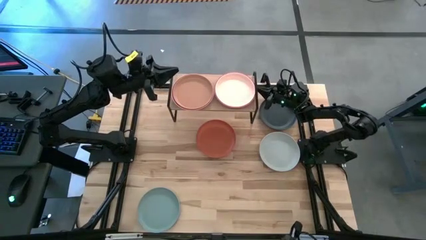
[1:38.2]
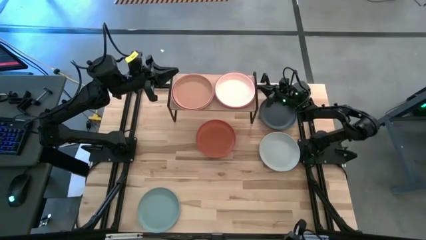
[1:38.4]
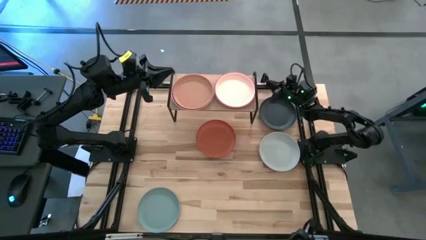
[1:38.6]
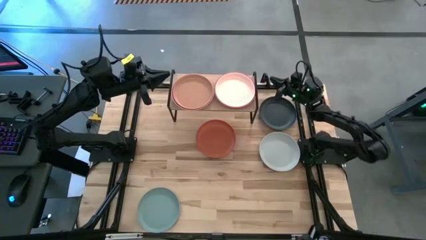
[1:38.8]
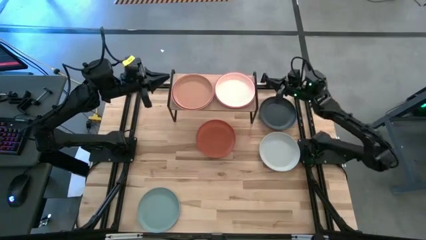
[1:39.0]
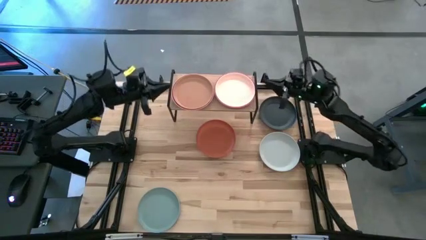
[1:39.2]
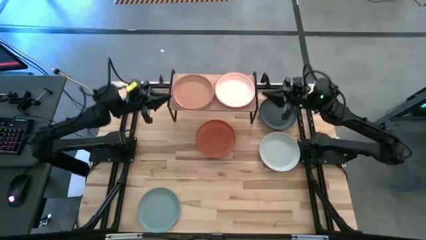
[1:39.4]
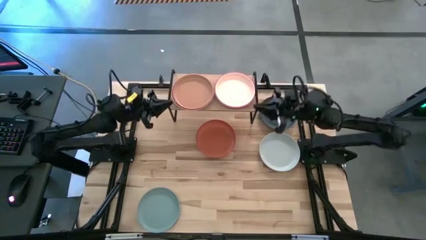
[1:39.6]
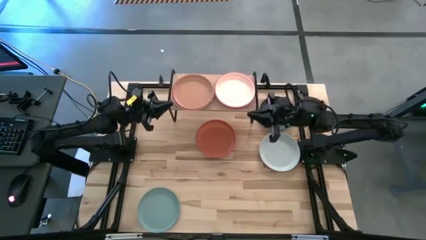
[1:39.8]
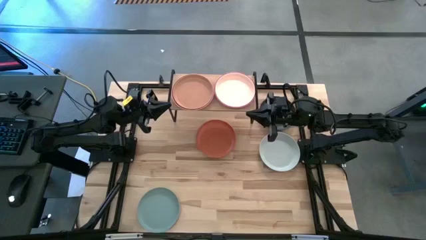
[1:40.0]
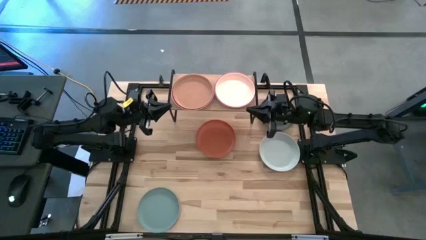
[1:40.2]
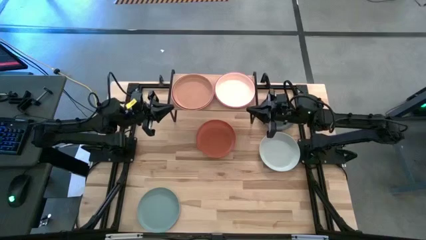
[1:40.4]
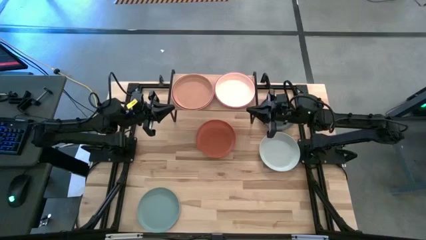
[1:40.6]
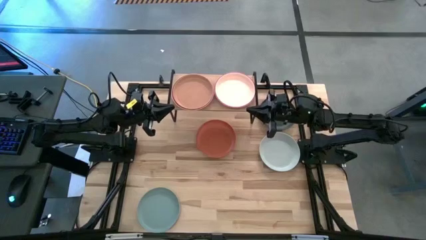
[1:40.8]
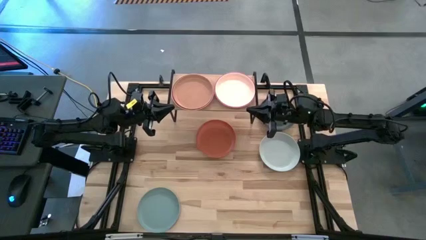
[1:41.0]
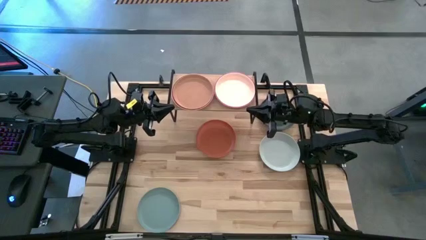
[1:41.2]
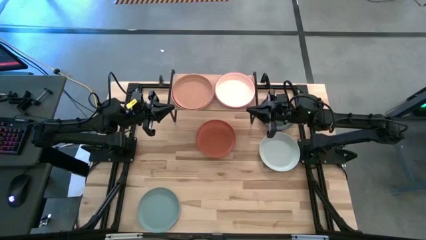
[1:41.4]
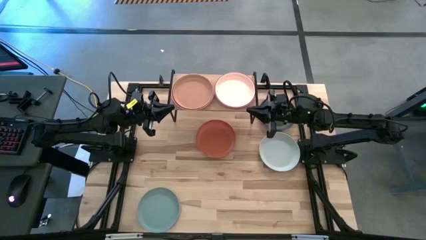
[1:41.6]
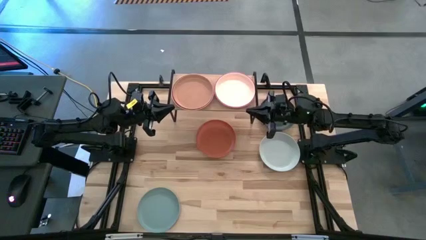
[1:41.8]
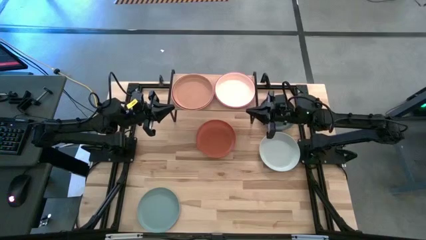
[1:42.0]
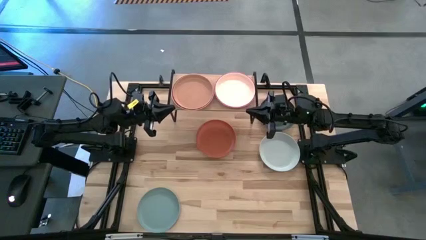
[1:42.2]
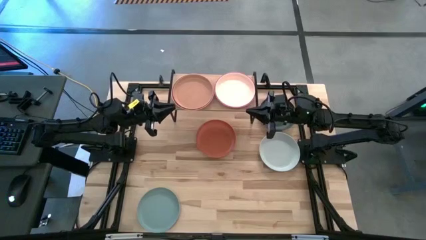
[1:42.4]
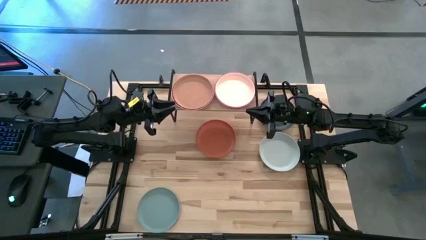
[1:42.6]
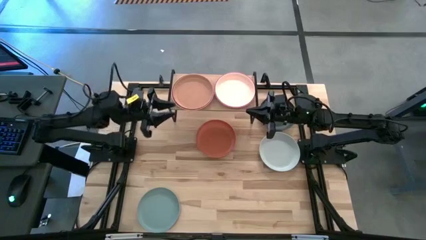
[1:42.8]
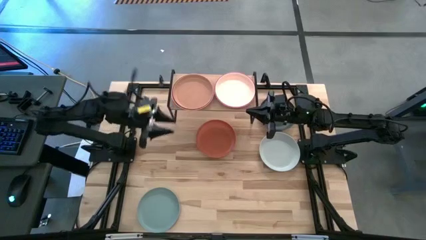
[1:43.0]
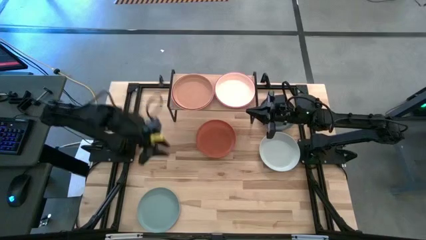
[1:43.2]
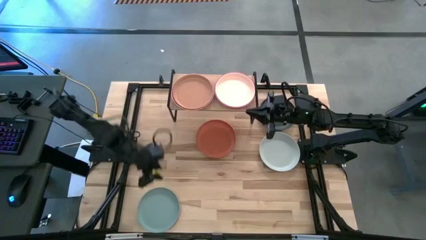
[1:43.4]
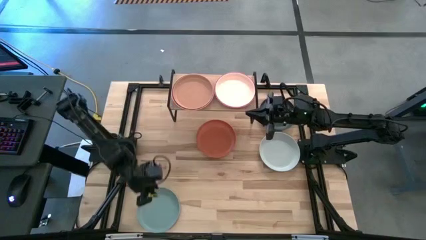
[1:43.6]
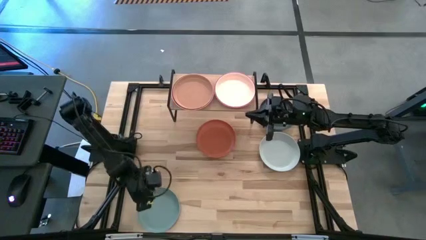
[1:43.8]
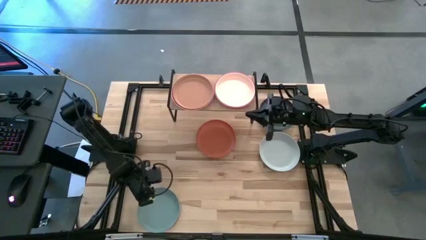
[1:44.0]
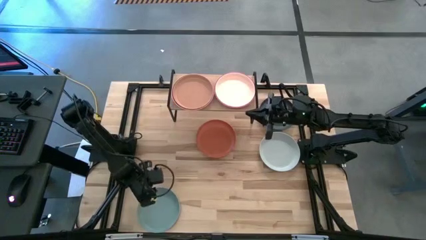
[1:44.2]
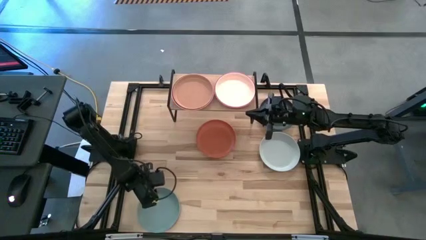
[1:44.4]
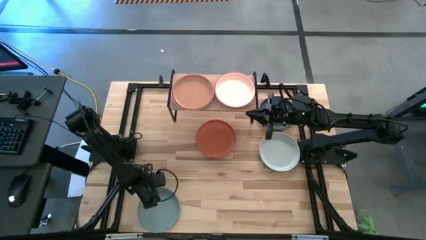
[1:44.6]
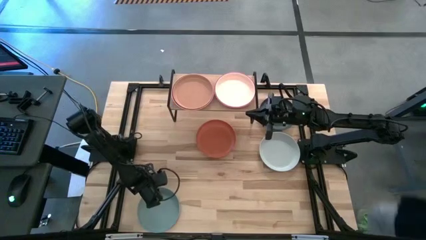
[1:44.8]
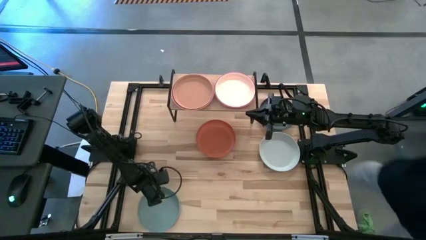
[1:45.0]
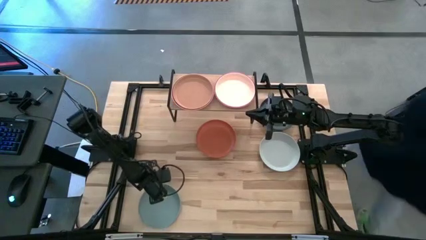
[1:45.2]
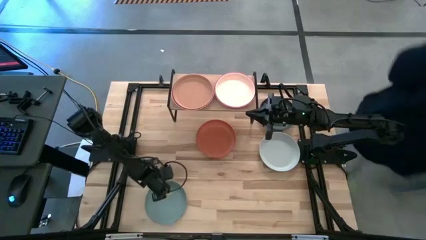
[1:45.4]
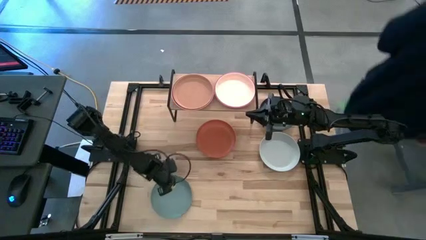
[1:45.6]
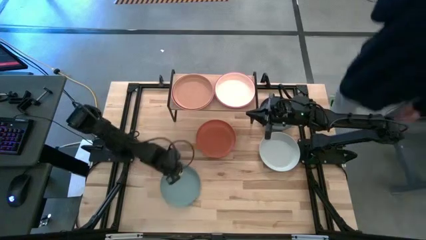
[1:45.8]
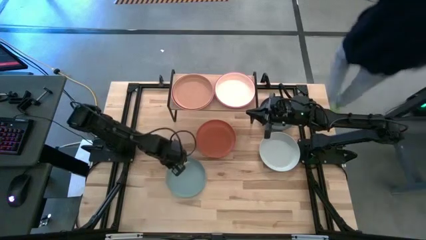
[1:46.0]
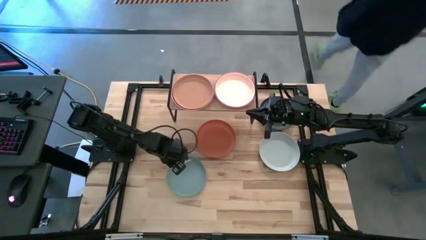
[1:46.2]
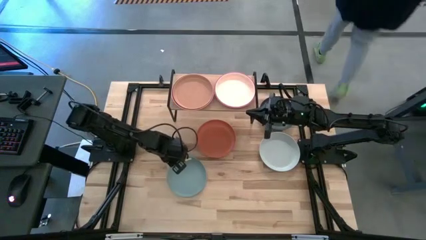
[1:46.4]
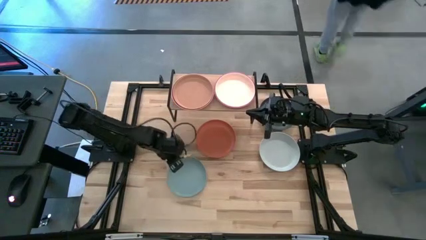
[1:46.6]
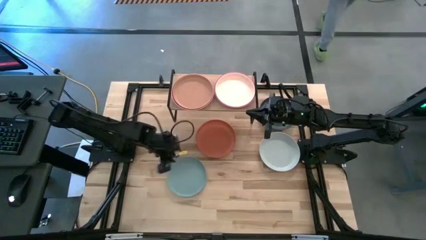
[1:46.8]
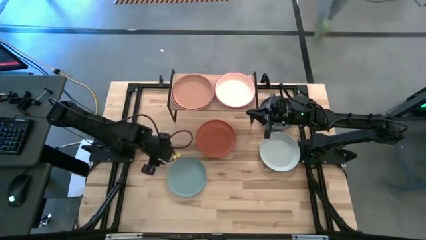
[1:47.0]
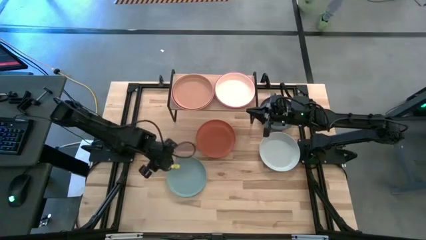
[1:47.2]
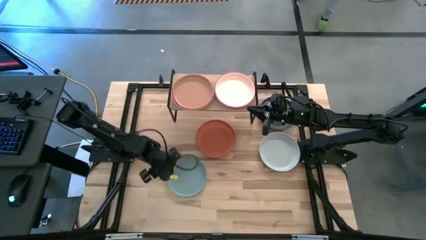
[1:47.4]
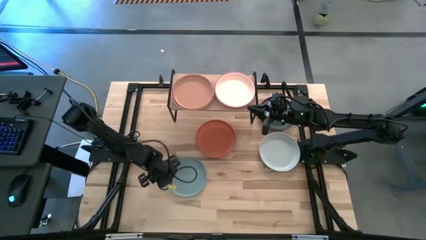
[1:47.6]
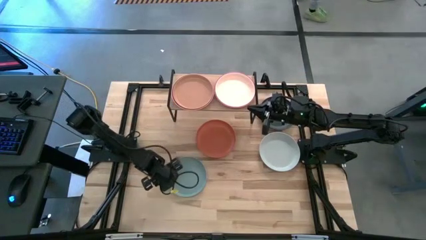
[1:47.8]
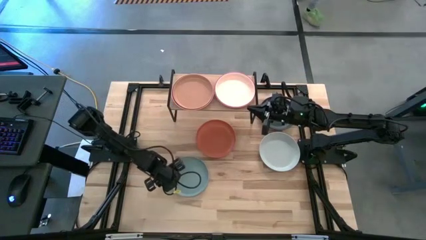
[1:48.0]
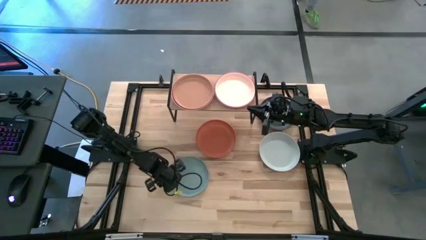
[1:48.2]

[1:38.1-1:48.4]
Task: Place and stack plates onto a shelf
Stack the light blue plate on top of the light brown plate

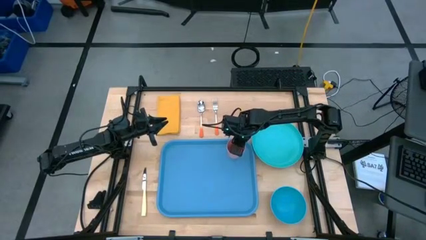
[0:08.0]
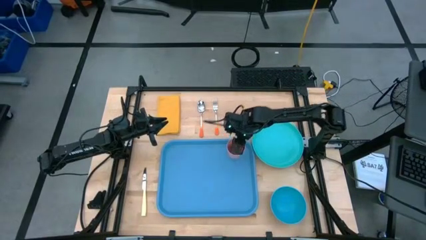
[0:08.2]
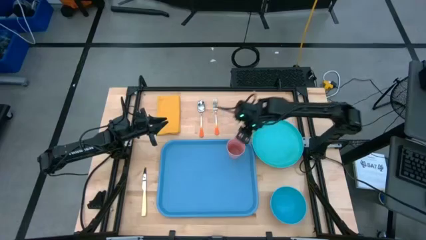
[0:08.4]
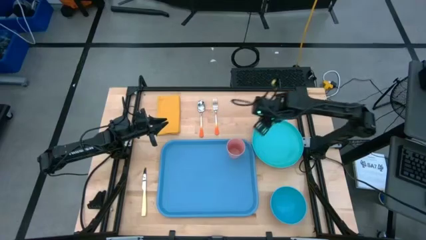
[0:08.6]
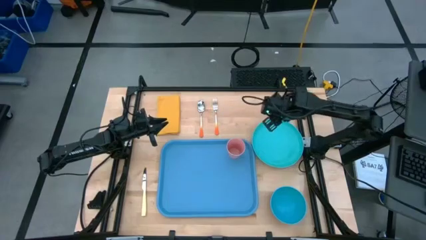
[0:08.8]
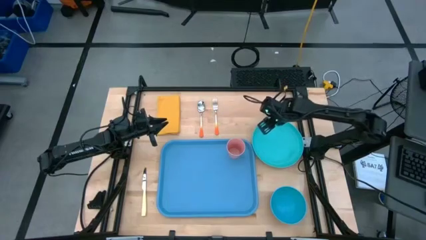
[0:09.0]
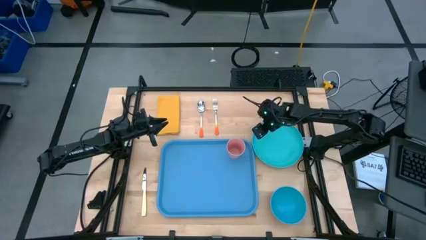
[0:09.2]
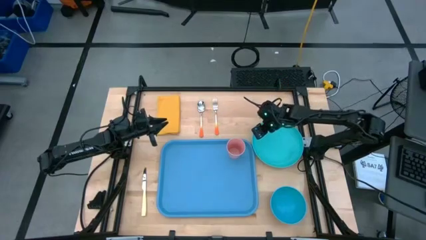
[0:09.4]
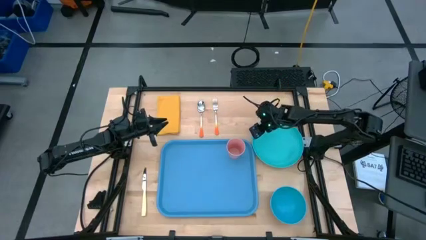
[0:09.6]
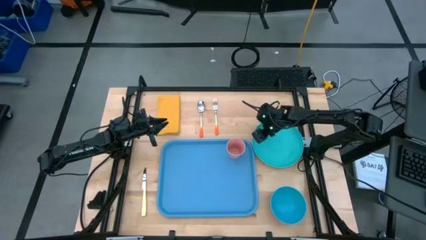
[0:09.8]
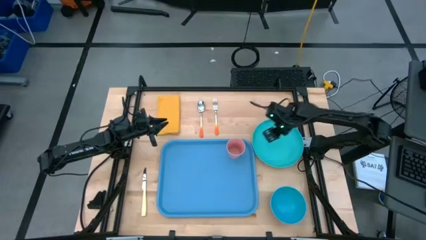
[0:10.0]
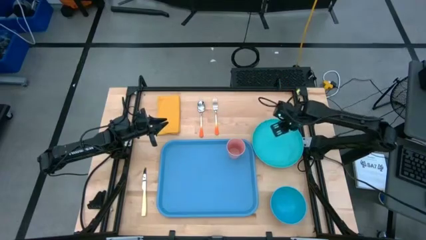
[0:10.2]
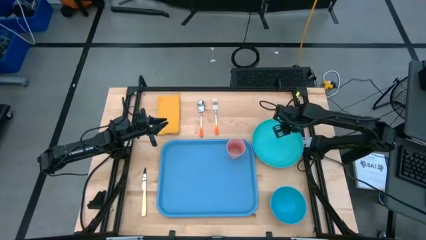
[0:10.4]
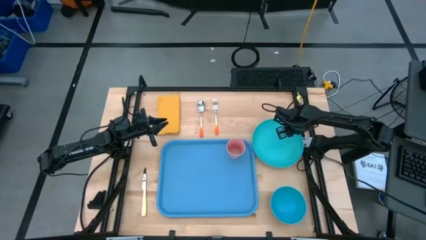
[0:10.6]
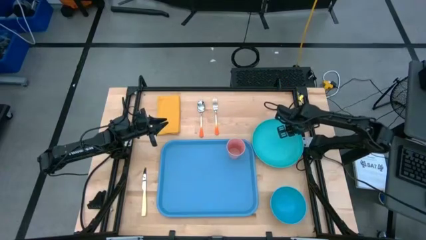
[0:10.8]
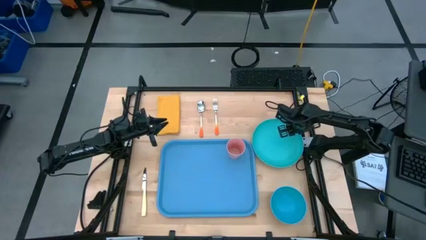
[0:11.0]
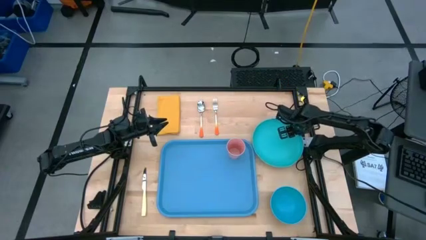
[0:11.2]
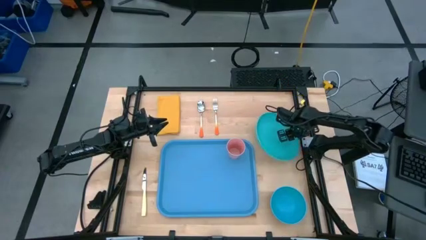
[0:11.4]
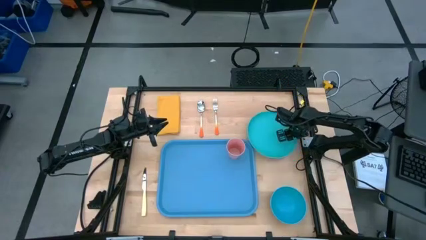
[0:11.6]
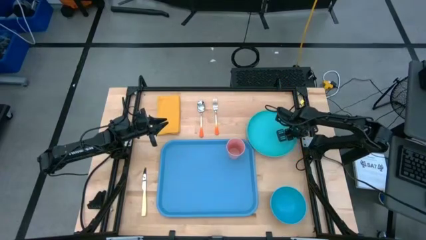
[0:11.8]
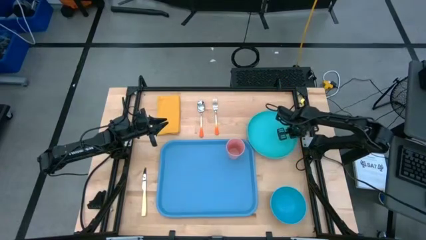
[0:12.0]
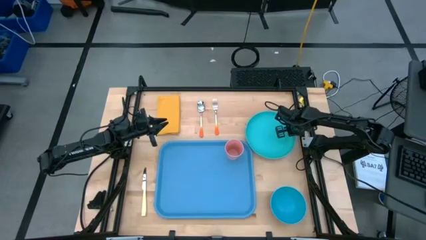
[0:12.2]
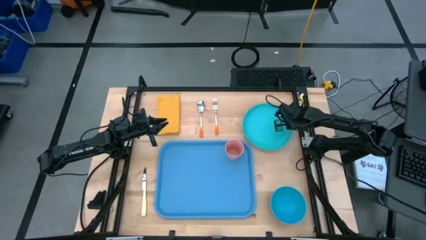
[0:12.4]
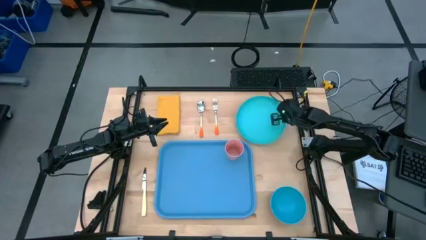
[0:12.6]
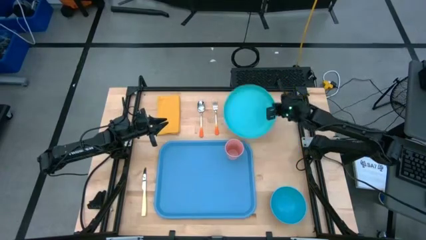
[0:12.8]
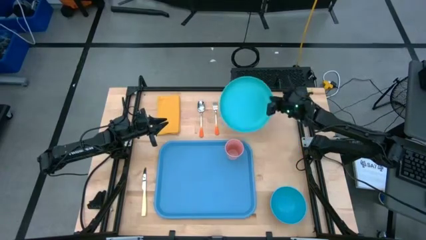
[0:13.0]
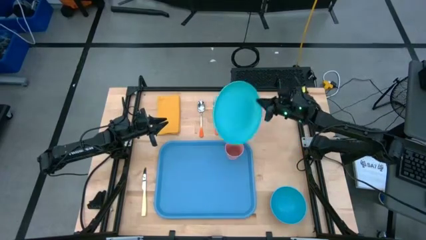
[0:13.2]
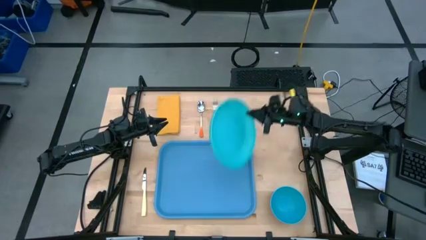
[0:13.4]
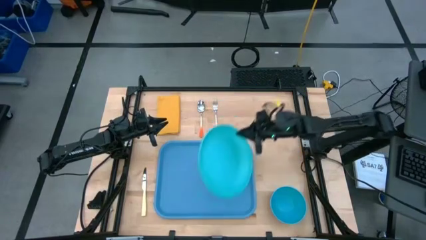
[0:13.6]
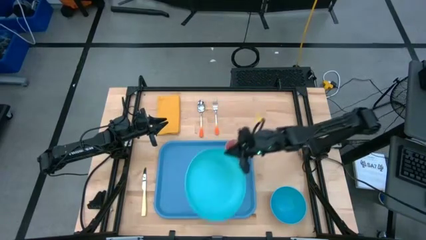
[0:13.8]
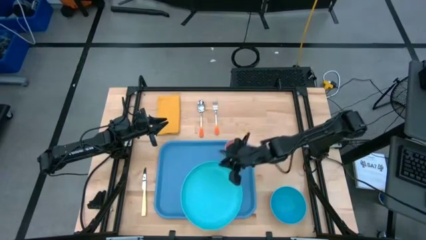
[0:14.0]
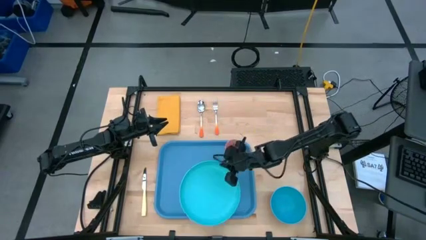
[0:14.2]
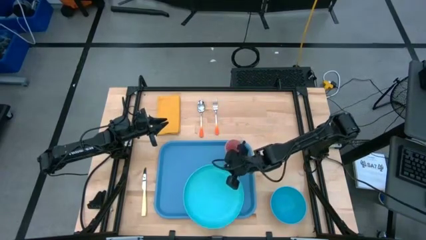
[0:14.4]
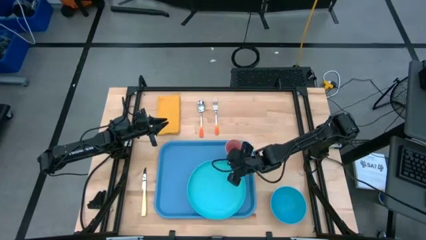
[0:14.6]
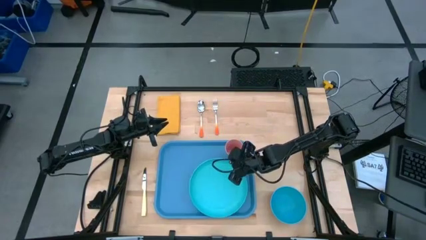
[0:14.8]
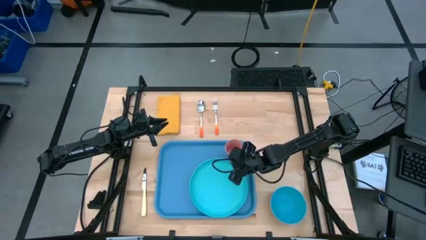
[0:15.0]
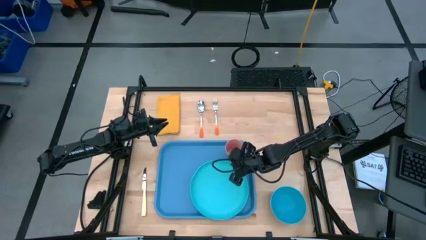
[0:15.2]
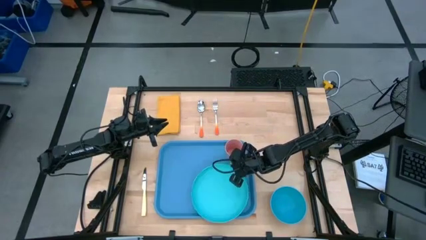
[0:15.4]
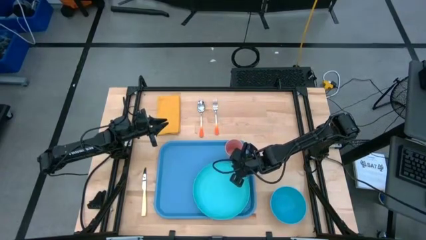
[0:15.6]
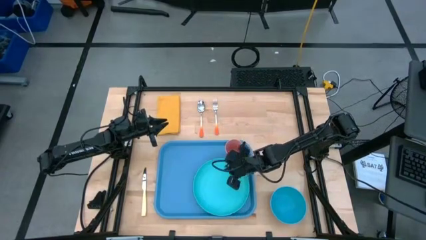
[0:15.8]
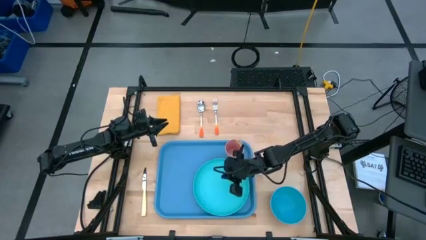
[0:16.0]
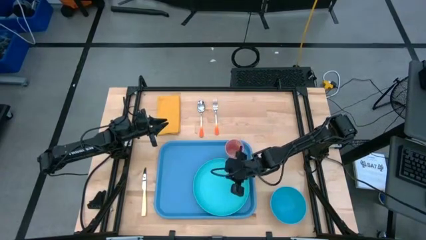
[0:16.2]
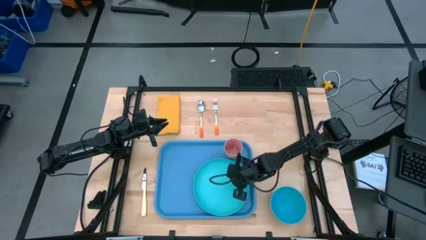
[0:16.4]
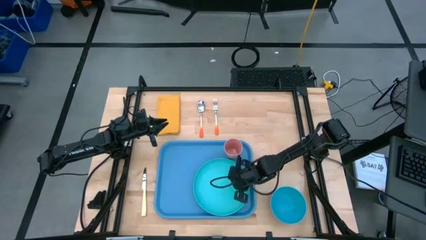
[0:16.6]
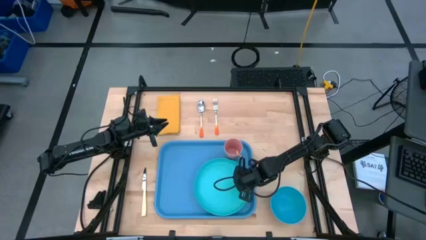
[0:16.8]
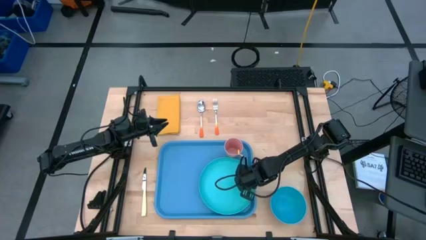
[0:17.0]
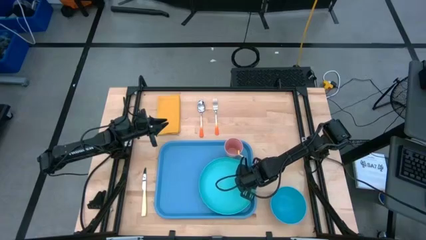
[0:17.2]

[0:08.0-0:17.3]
Task: Set up tray
Put the green plate on the blue tray
